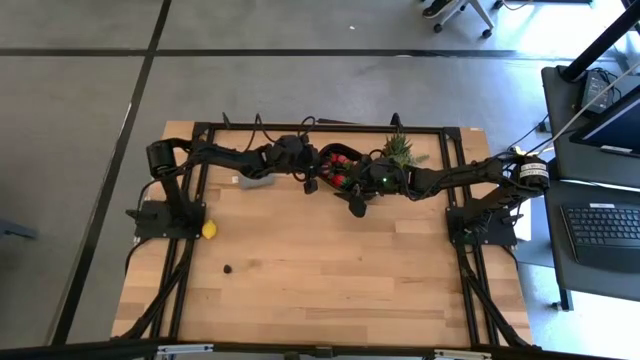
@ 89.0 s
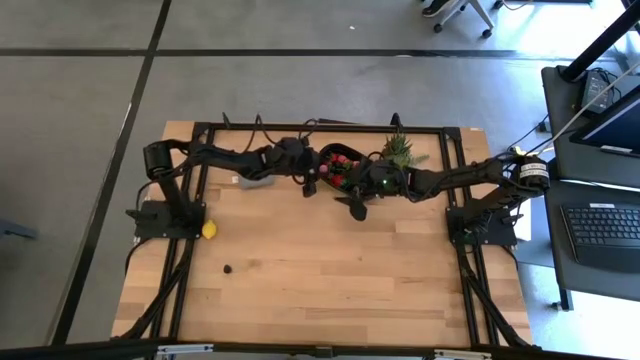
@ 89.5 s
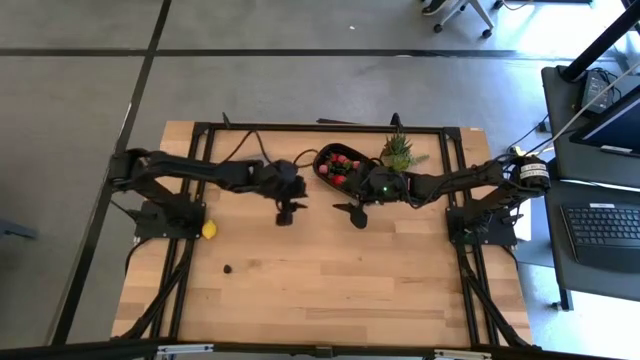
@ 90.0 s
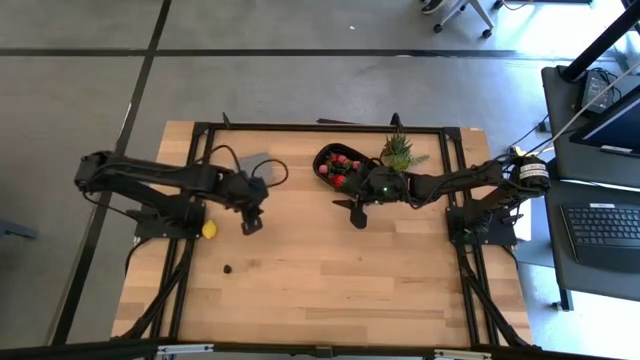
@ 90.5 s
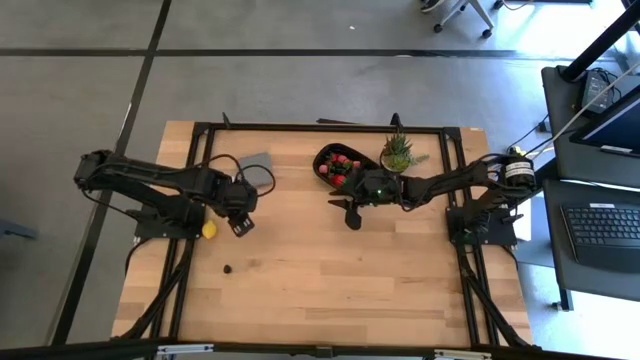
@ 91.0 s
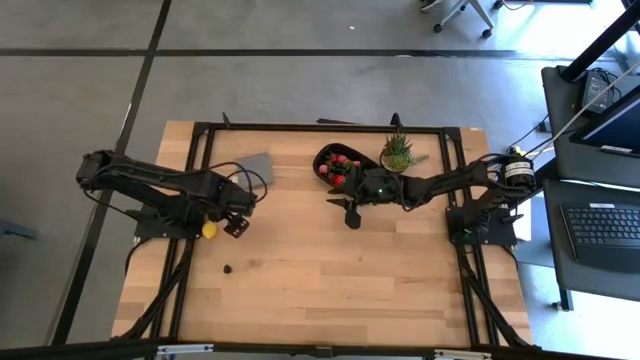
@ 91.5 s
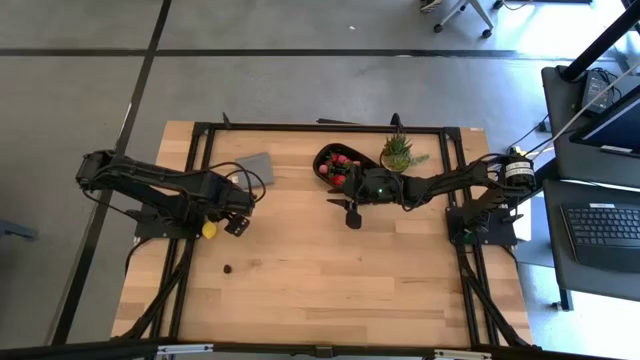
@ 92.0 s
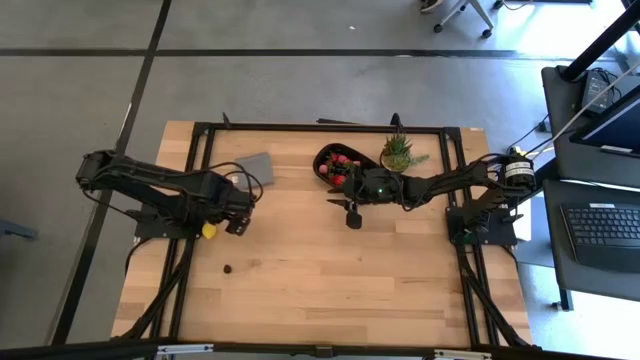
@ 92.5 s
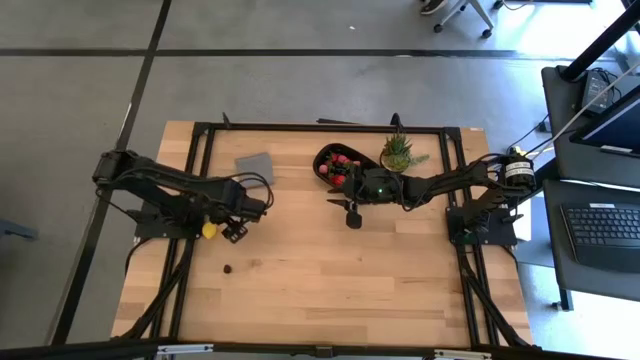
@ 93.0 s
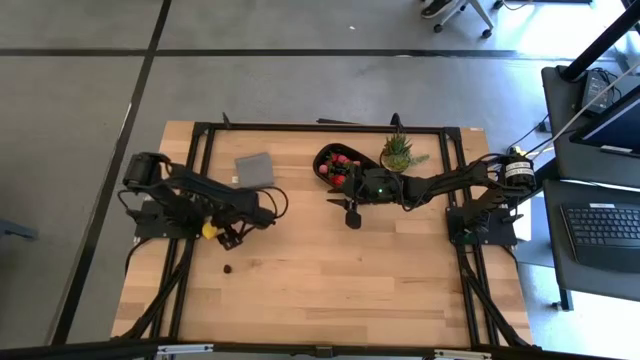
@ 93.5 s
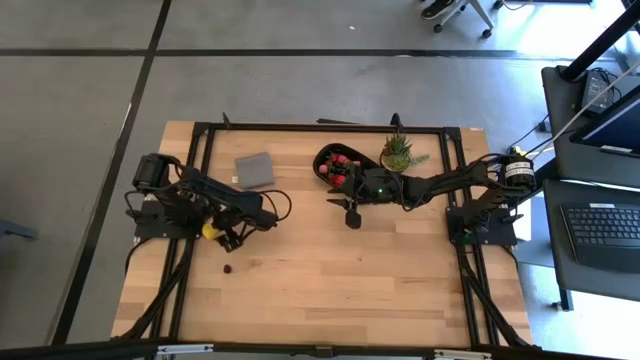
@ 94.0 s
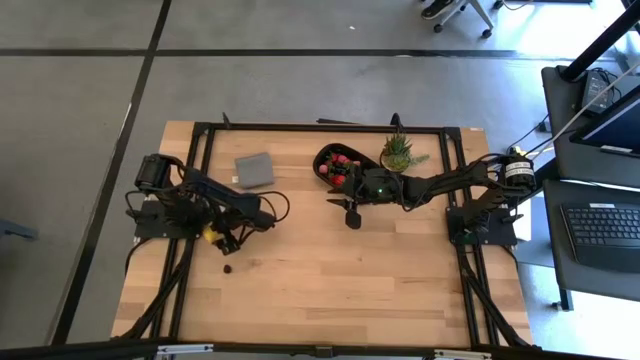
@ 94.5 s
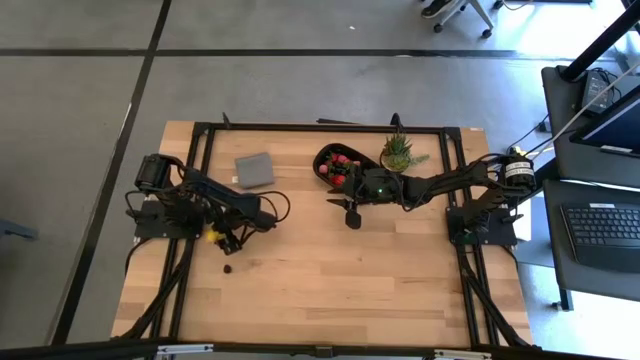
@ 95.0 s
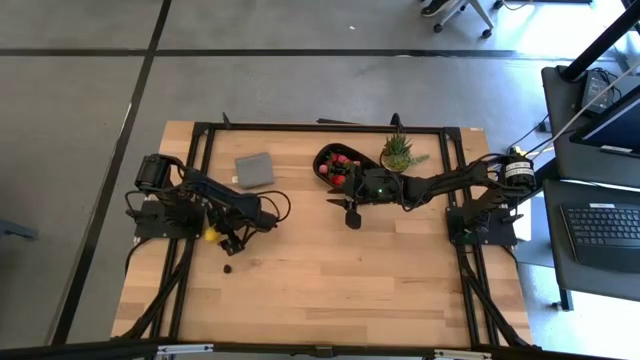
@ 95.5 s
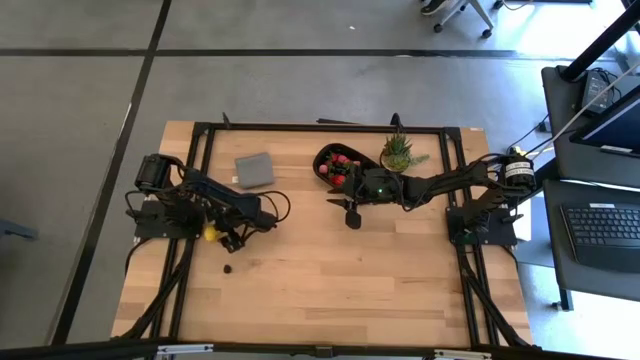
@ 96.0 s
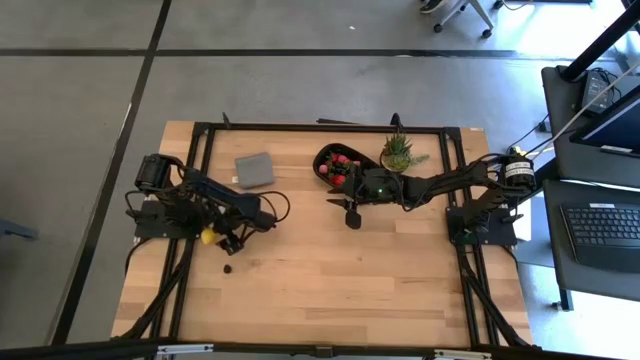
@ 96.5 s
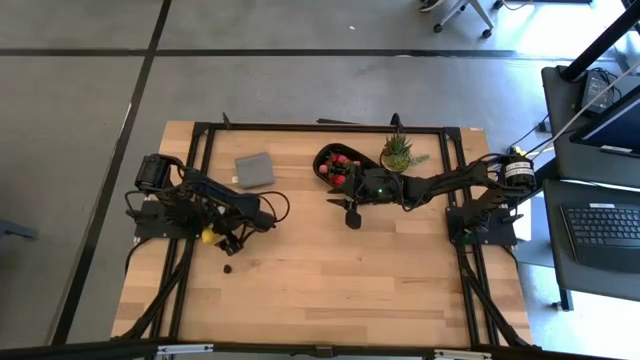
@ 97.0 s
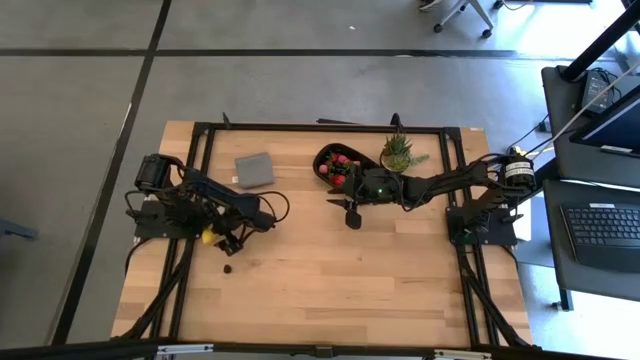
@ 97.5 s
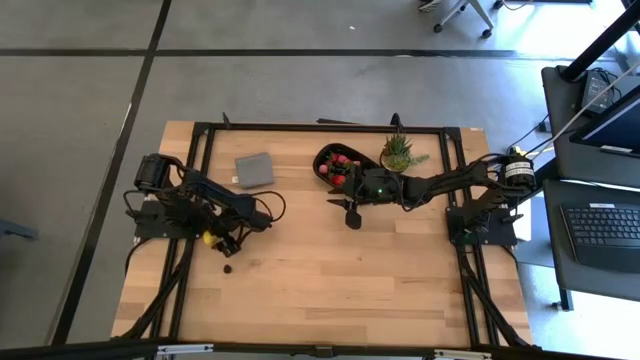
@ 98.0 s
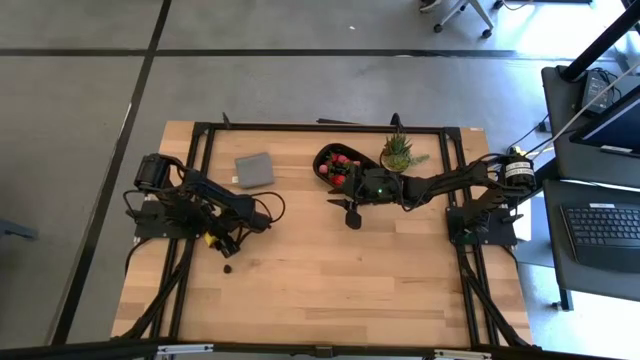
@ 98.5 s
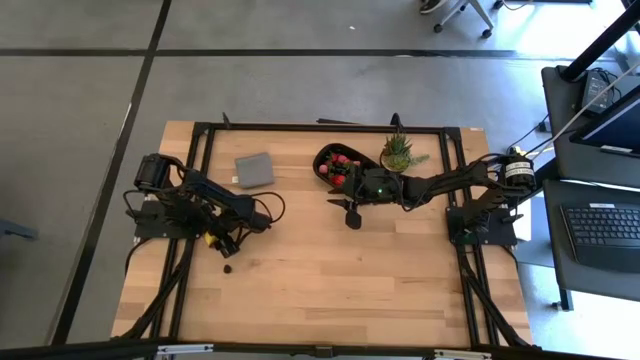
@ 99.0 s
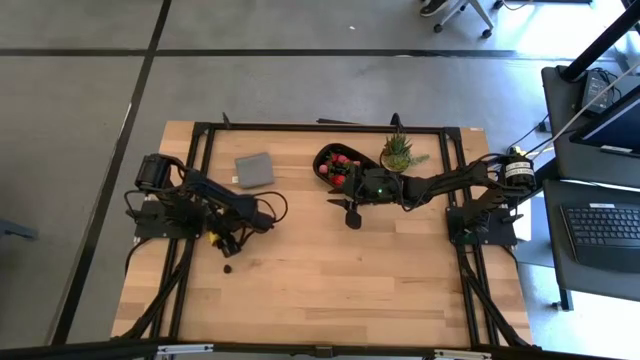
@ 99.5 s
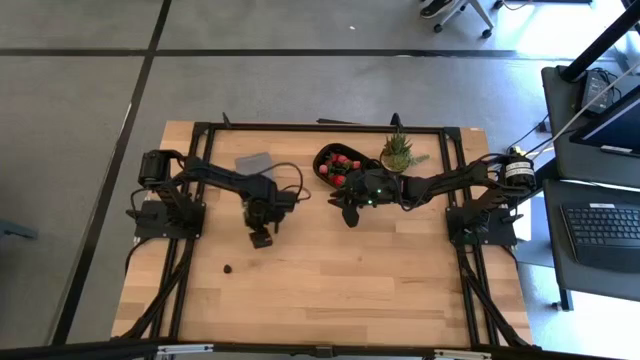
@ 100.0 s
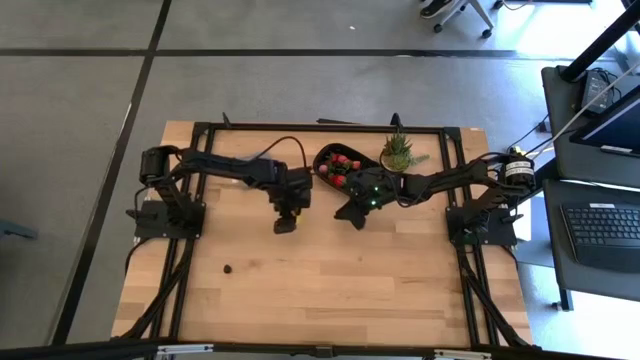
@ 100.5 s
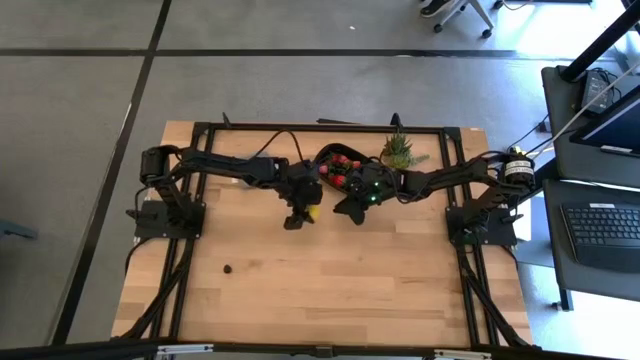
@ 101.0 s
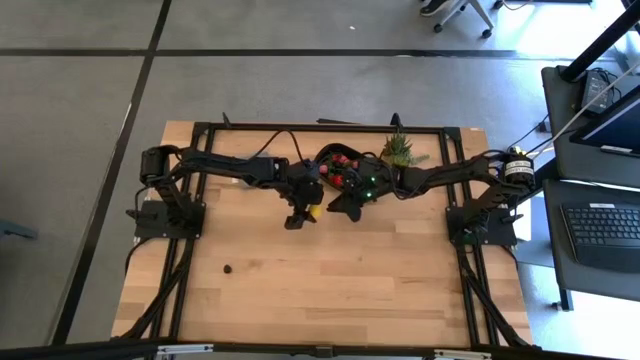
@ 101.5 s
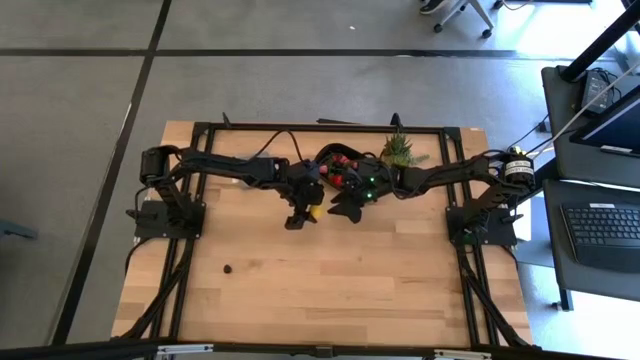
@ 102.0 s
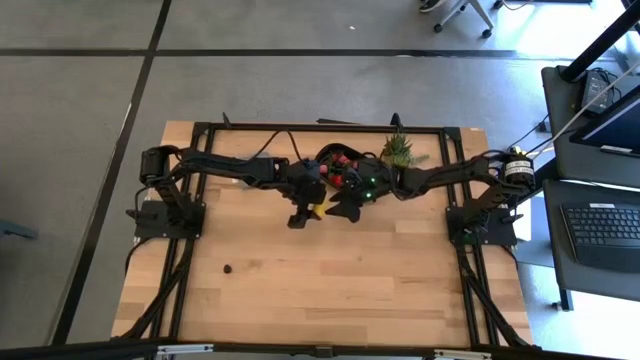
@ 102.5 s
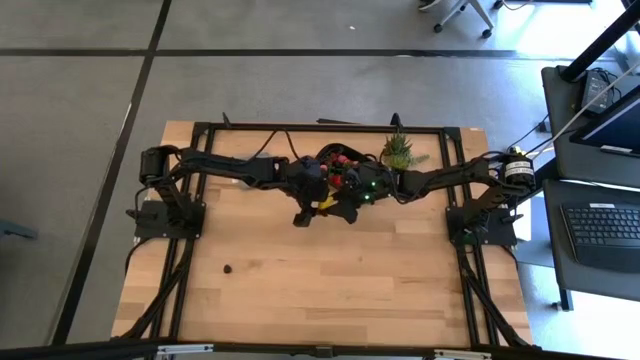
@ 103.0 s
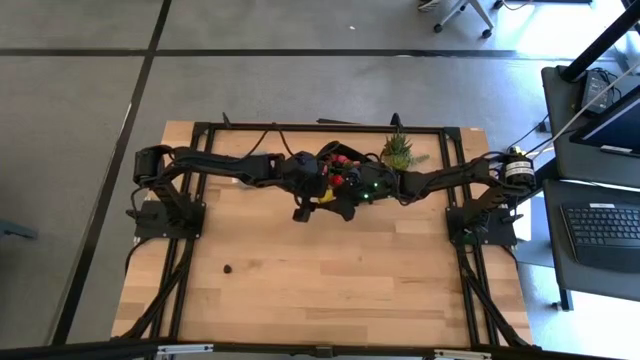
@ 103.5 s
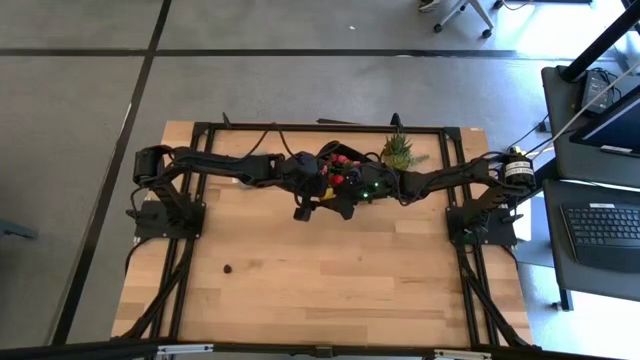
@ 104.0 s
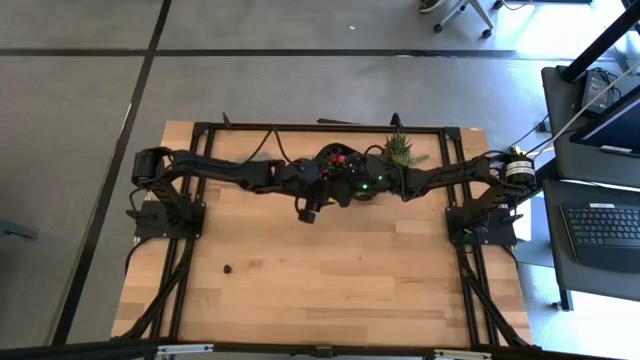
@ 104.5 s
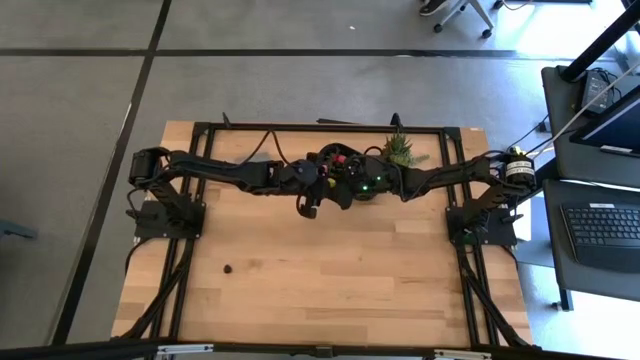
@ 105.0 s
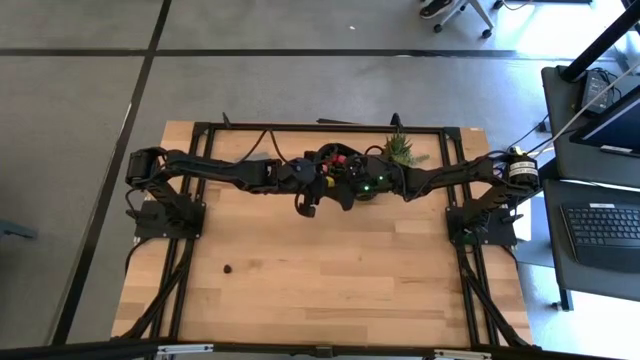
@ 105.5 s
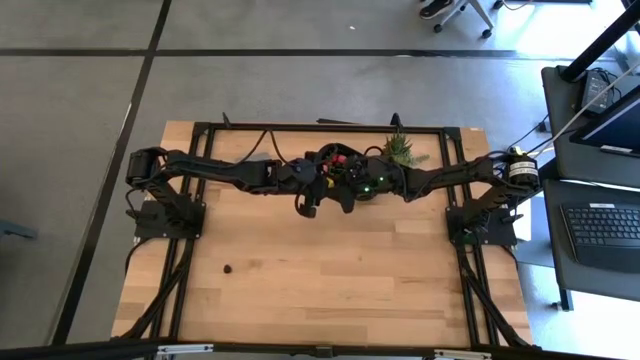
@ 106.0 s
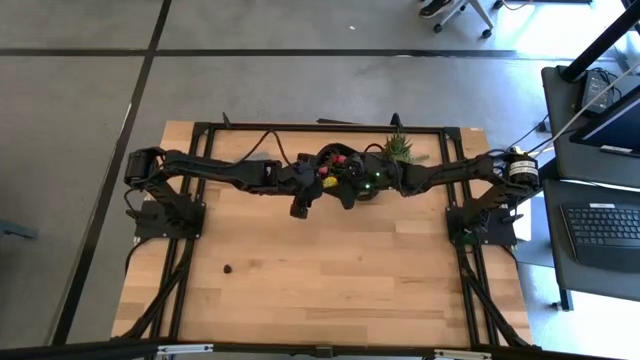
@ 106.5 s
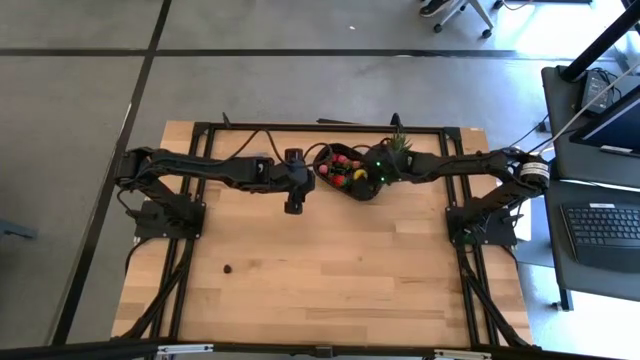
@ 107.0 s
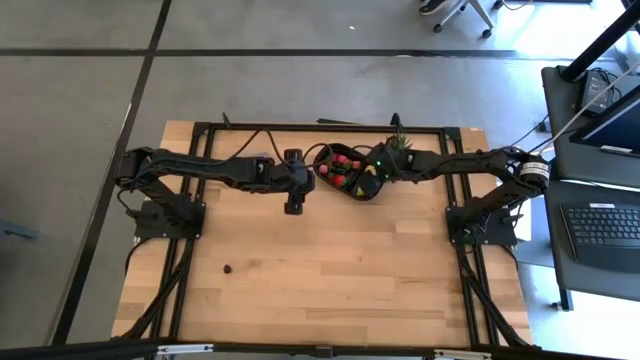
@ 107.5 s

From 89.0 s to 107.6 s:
Task: Pick and placing Produce into tupperware
Put the lemon into the black bin

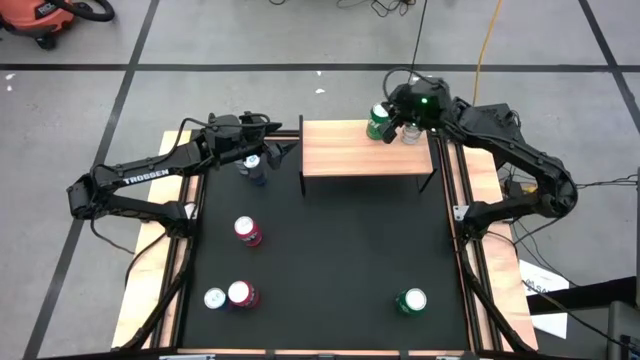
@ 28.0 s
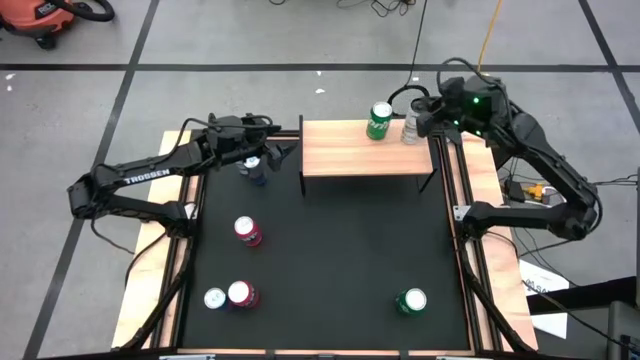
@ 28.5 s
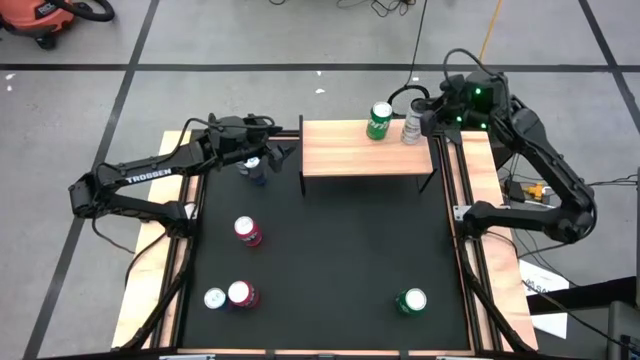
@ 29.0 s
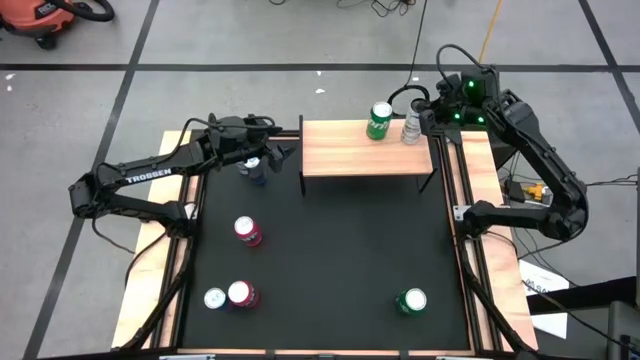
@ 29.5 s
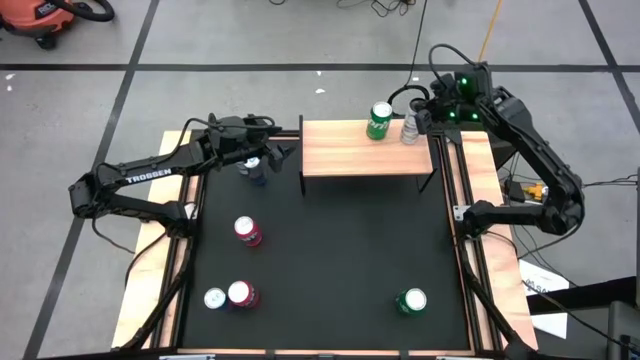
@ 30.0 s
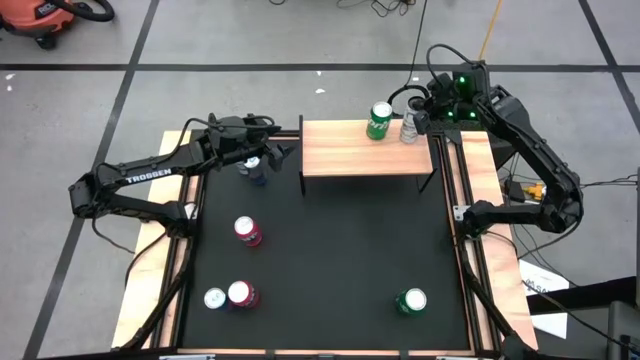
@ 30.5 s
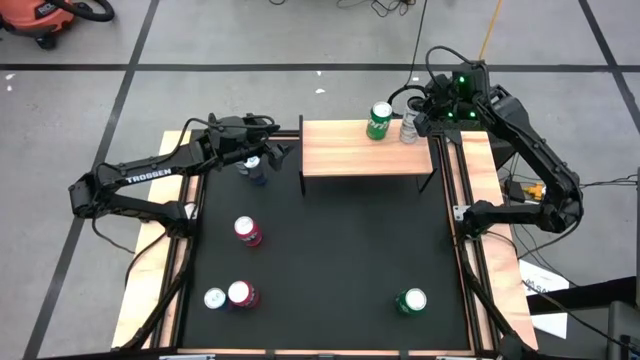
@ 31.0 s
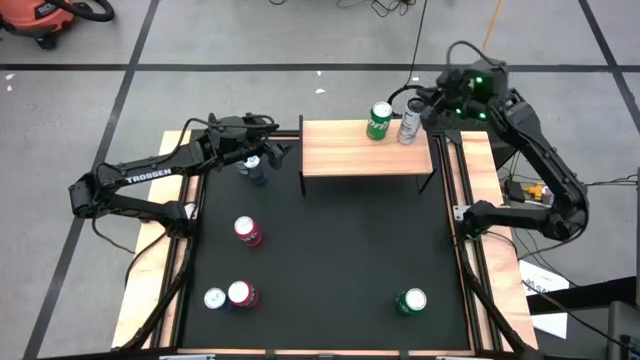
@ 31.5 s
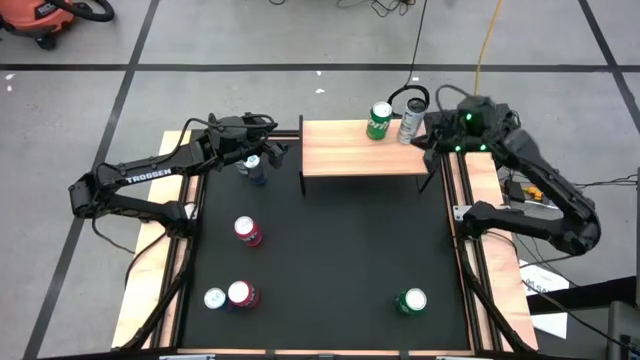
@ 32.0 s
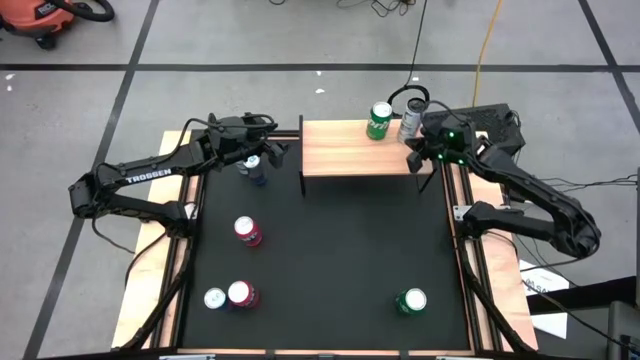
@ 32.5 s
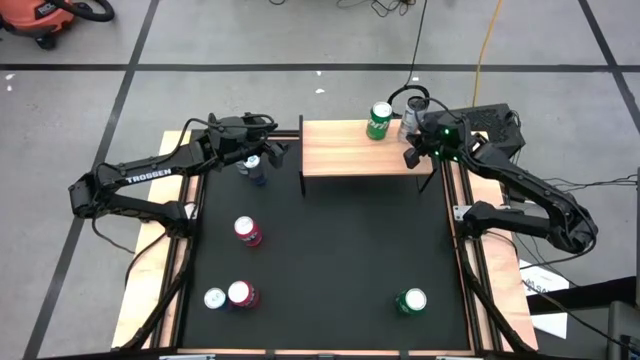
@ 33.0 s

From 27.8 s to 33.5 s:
Task: Place canned beverage on shelf
Adjust the white soda can on the shelf
